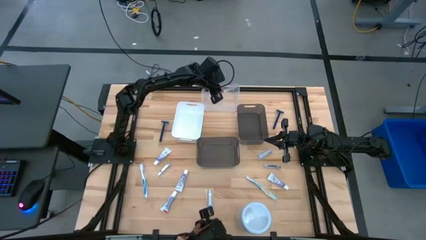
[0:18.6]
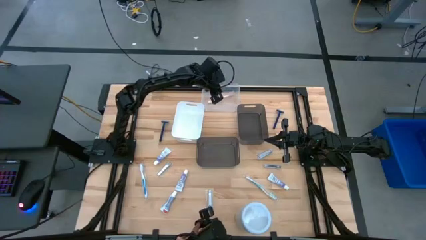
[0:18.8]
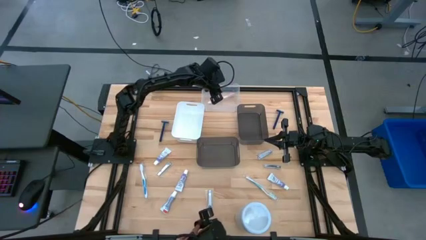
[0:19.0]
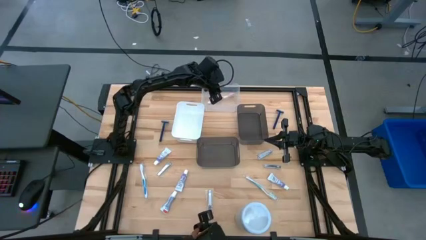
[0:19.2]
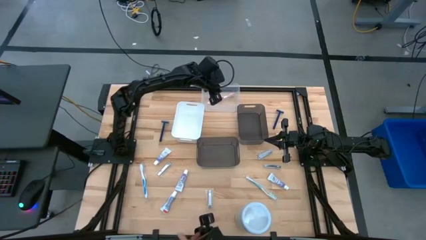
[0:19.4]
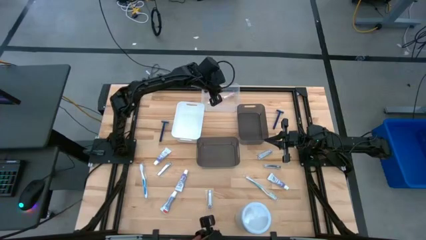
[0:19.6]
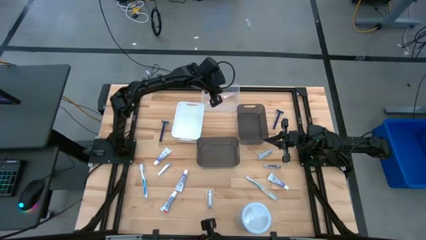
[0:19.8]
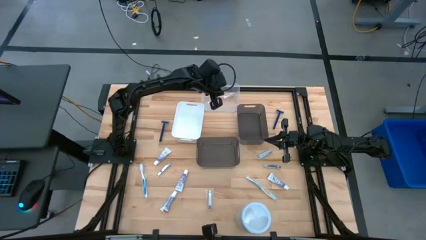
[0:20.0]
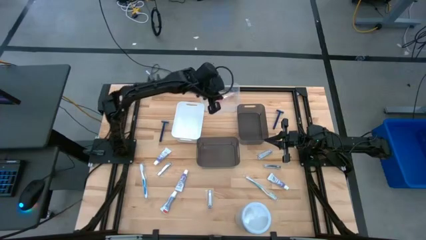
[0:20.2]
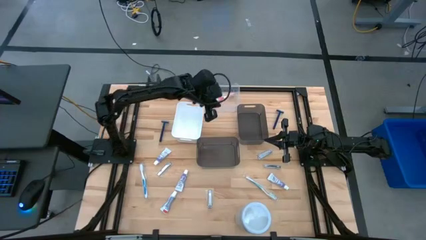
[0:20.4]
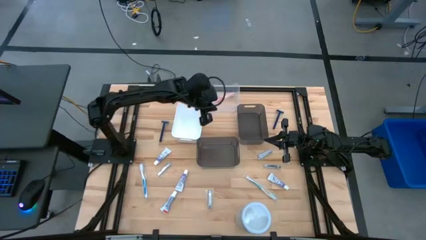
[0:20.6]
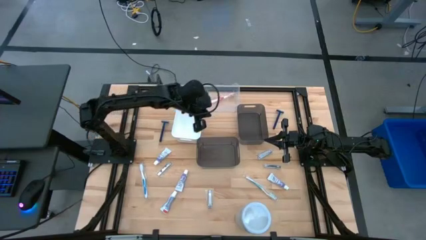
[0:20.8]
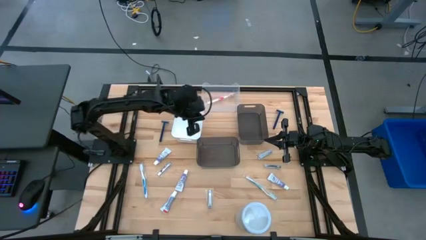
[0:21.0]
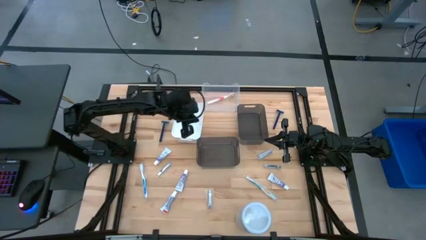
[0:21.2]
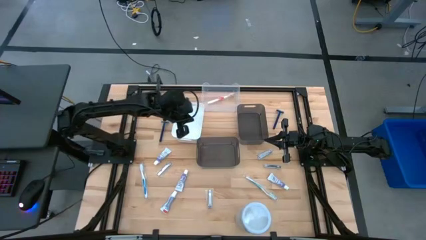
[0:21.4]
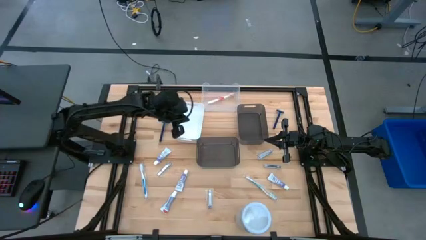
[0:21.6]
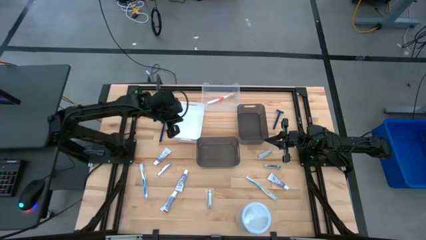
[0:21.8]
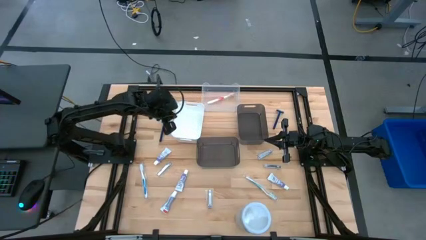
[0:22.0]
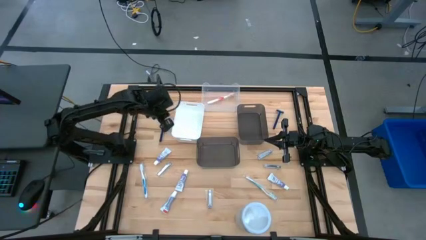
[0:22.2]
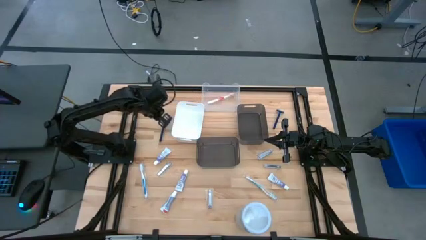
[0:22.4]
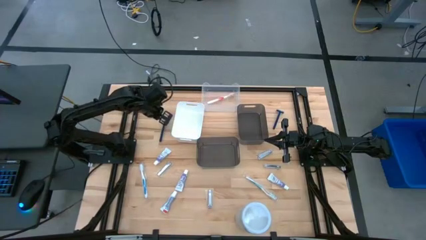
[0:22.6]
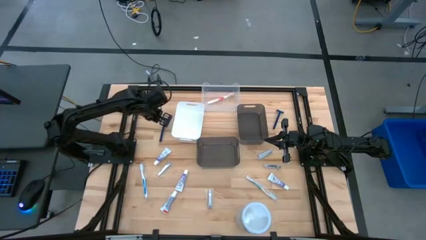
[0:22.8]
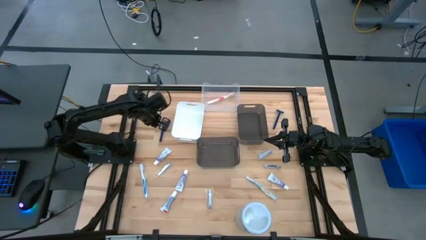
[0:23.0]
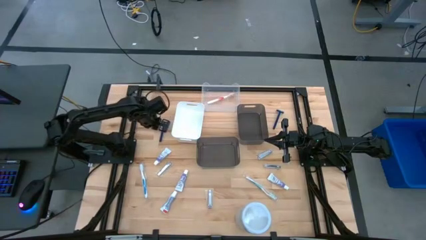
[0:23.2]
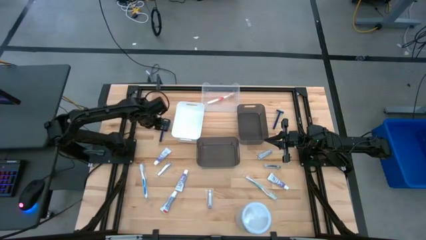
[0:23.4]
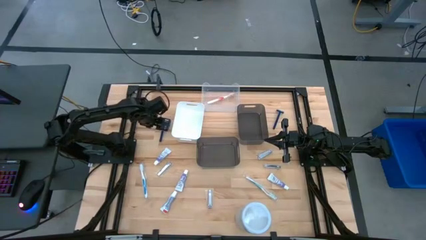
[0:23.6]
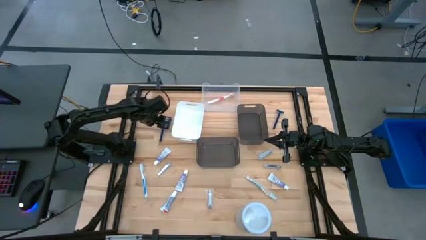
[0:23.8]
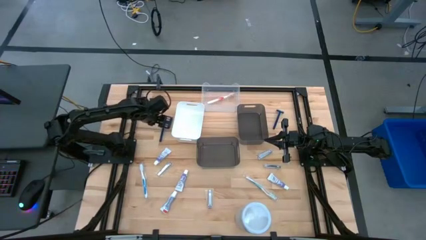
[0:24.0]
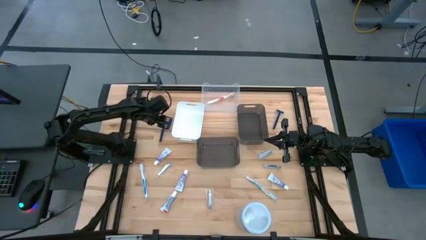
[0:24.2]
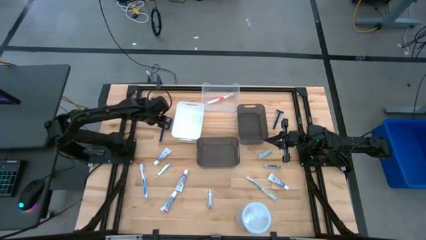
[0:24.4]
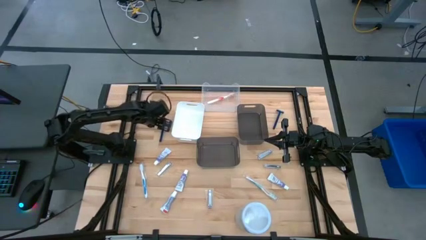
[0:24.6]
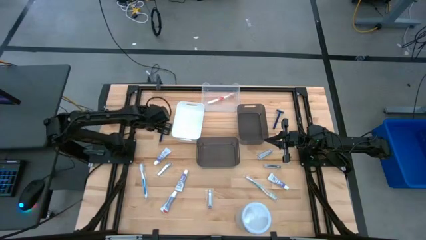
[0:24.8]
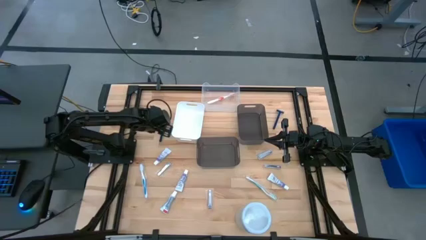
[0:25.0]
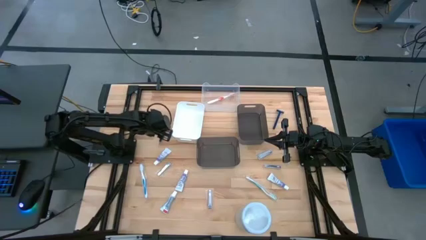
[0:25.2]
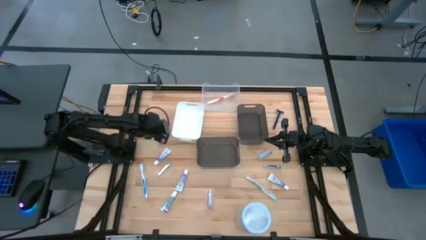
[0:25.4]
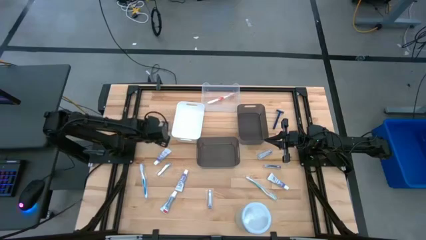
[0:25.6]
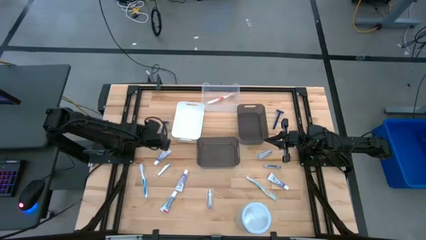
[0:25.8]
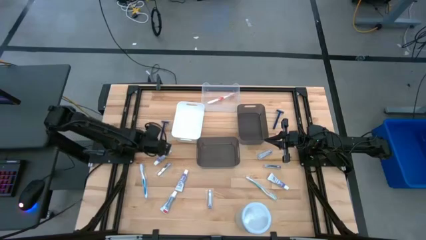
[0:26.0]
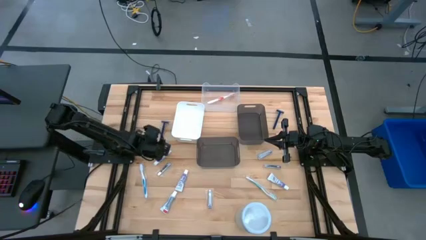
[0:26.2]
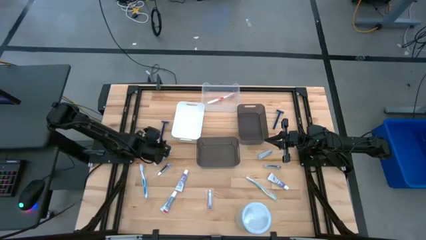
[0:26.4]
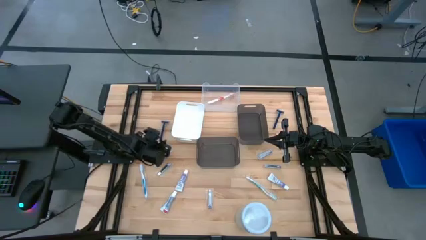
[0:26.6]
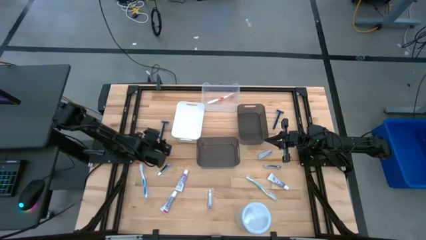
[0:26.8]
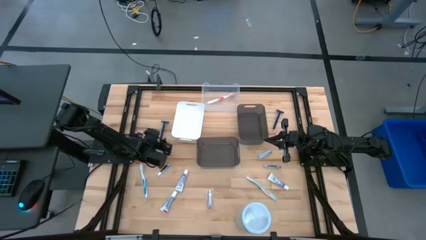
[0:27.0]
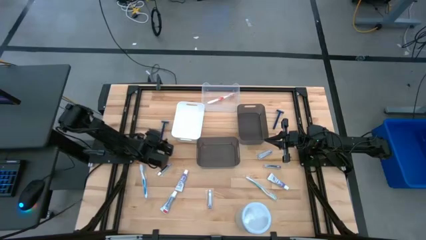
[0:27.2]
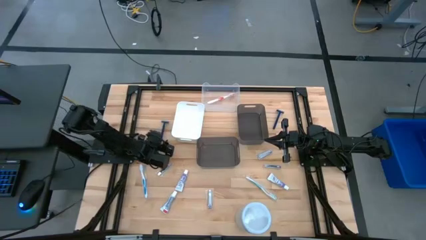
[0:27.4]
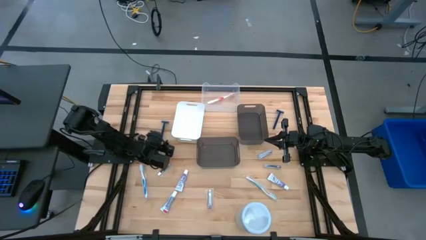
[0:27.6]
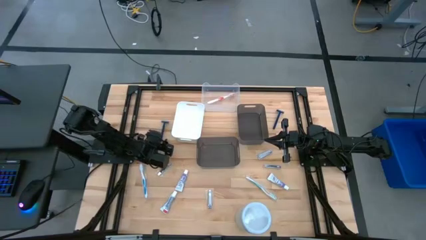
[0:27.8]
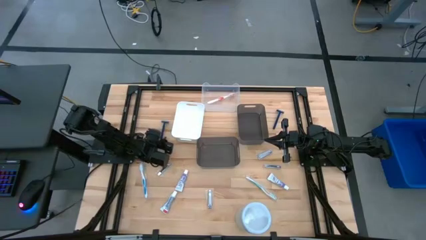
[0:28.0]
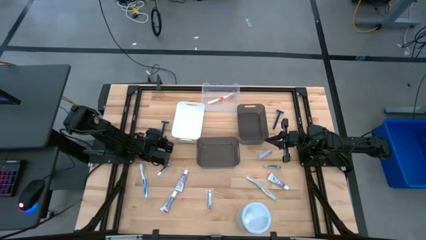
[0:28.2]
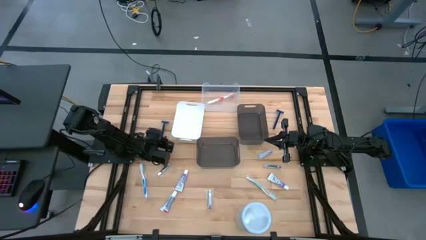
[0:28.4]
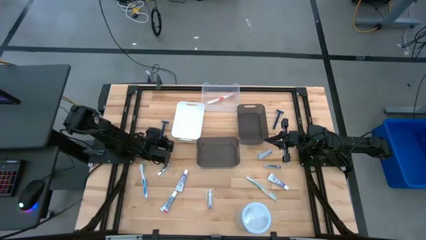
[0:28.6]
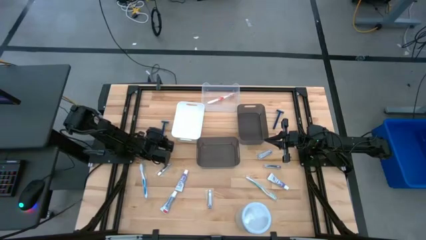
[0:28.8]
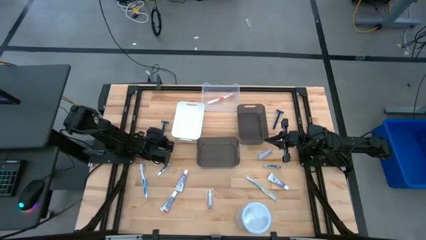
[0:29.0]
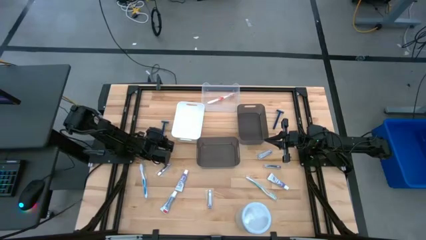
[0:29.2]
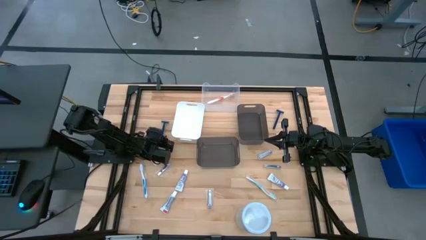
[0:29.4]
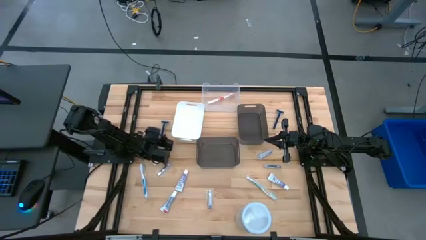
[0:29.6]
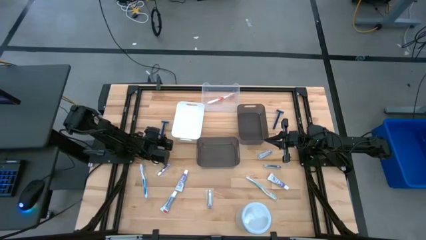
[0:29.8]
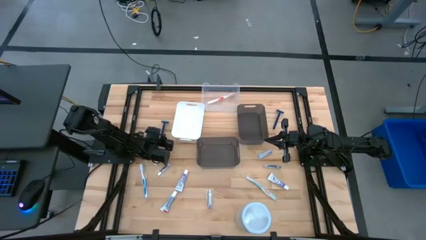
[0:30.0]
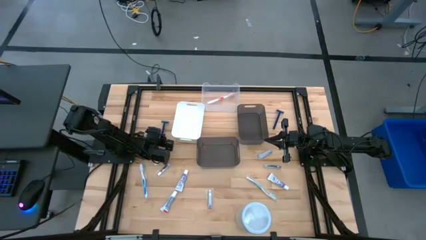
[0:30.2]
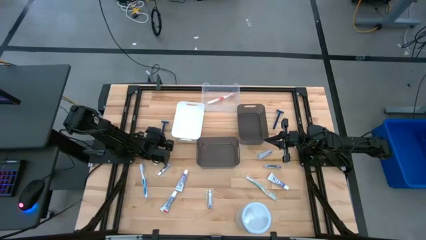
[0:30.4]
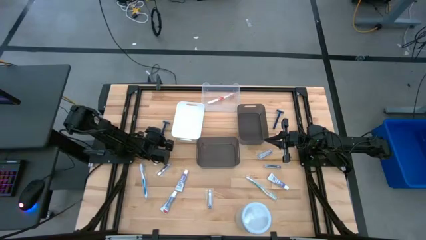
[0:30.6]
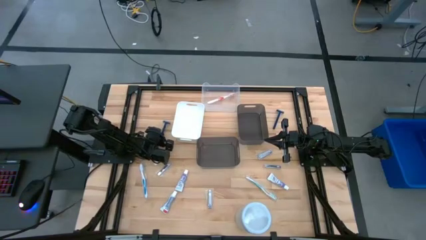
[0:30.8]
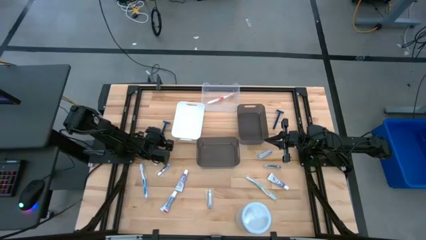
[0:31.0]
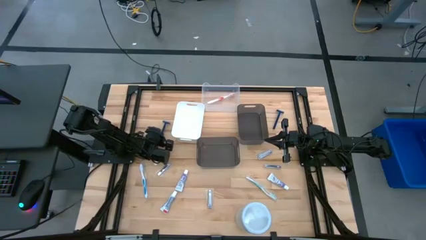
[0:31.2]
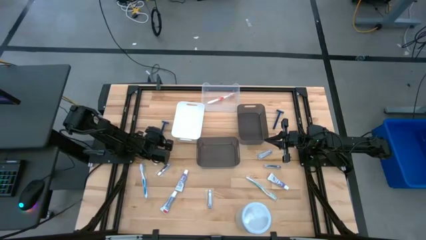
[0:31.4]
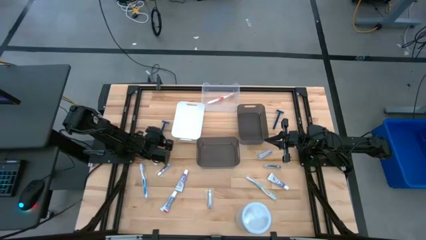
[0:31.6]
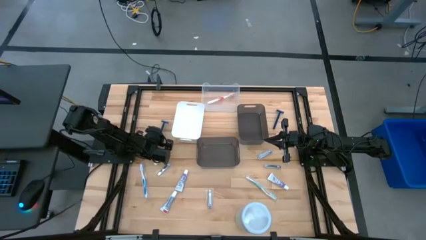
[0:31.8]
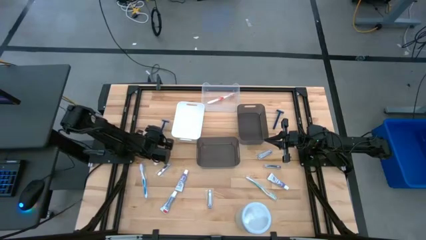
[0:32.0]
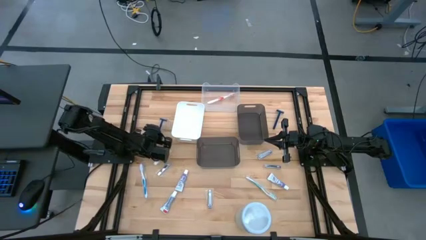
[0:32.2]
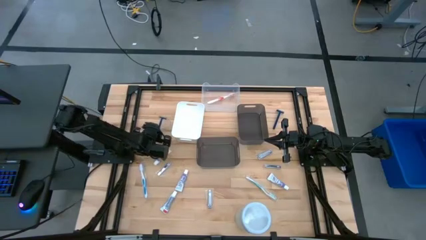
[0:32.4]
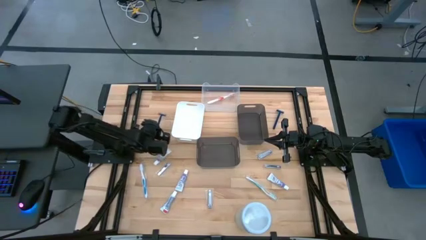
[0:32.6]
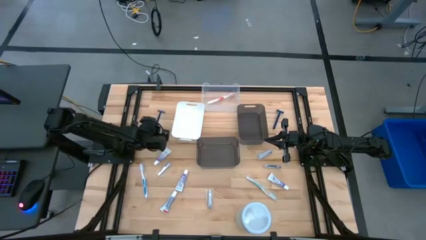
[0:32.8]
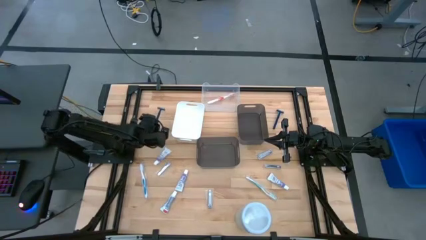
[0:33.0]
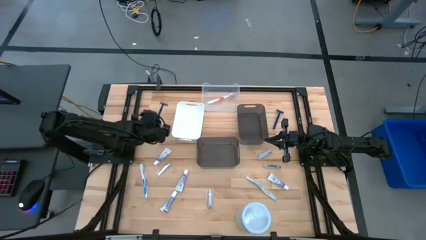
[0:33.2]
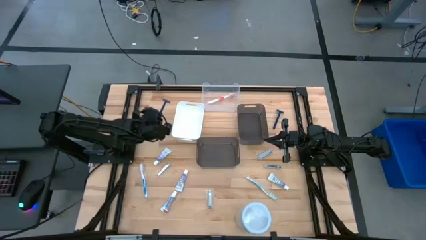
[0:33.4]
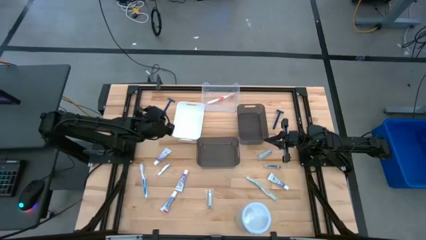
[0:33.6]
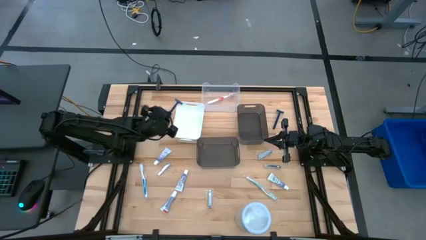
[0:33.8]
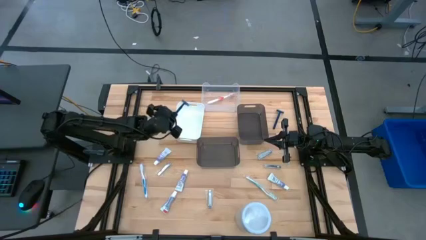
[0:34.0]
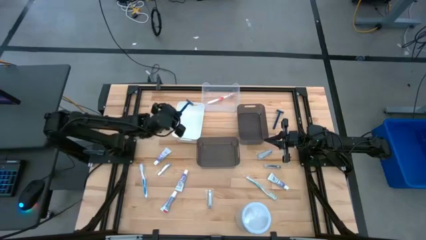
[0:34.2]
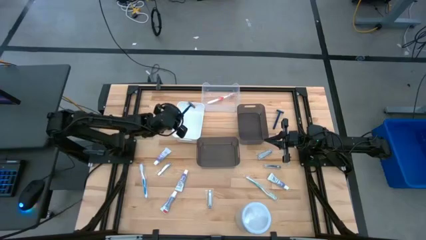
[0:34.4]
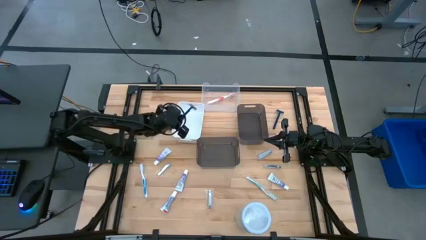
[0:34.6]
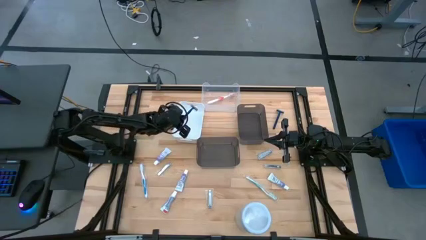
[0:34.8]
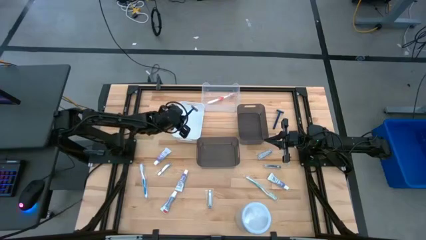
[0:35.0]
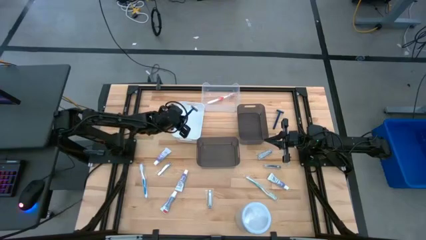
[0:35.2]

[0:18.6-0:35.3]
Task: Pick & Place Travel size toiletries
Put the blue razor into the white bin
